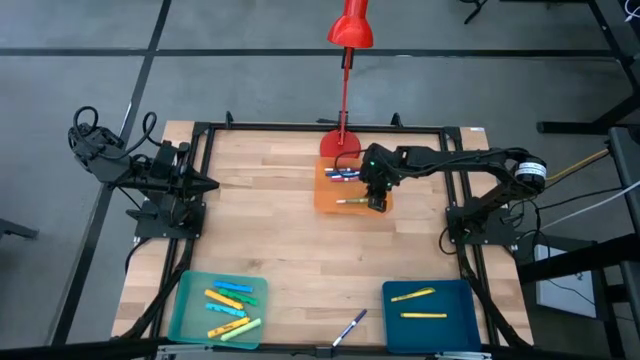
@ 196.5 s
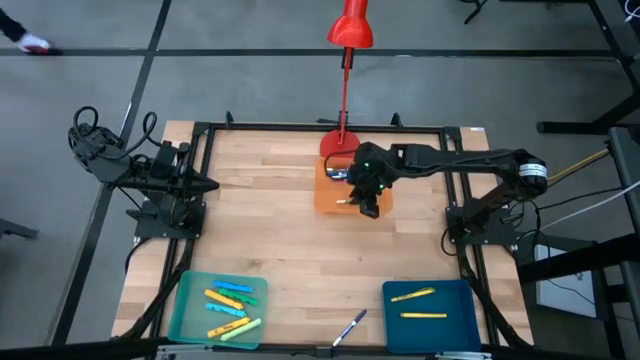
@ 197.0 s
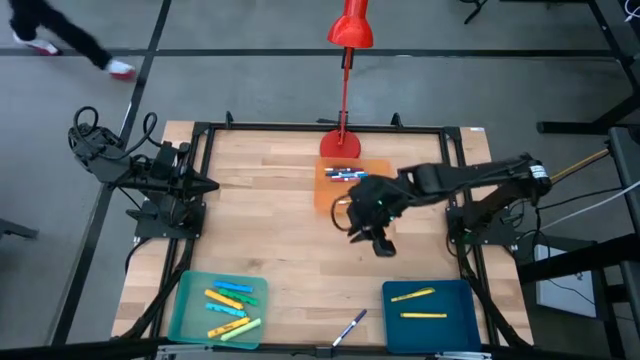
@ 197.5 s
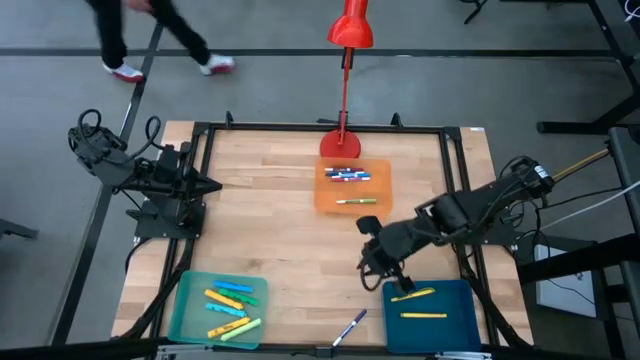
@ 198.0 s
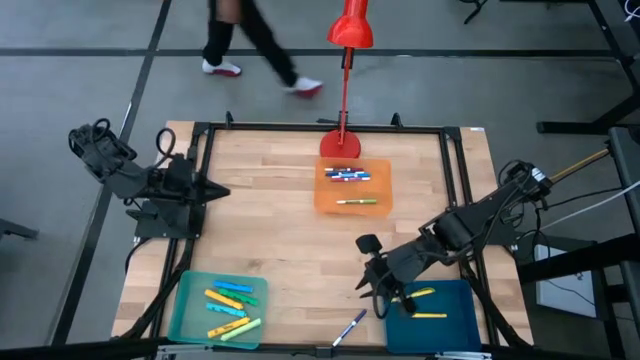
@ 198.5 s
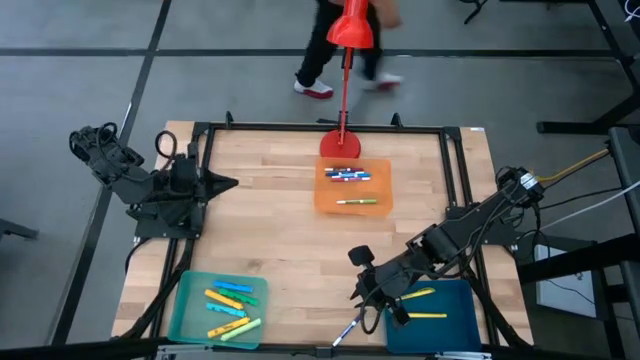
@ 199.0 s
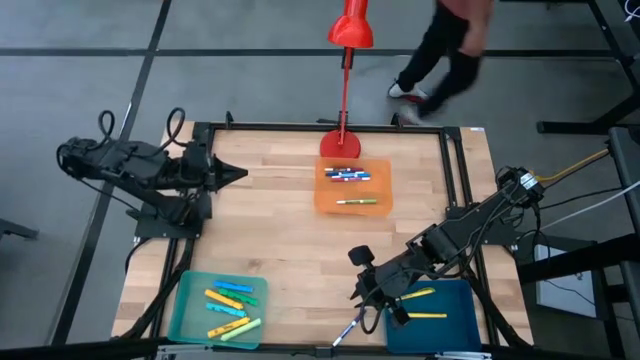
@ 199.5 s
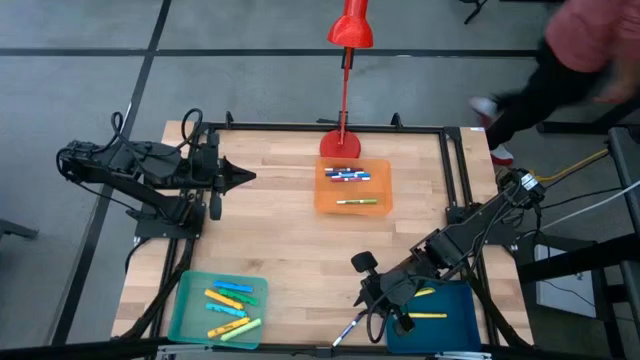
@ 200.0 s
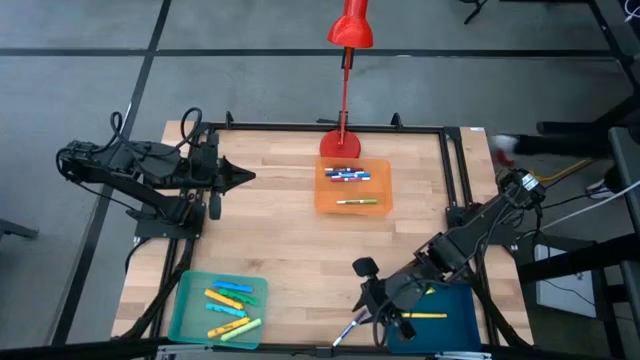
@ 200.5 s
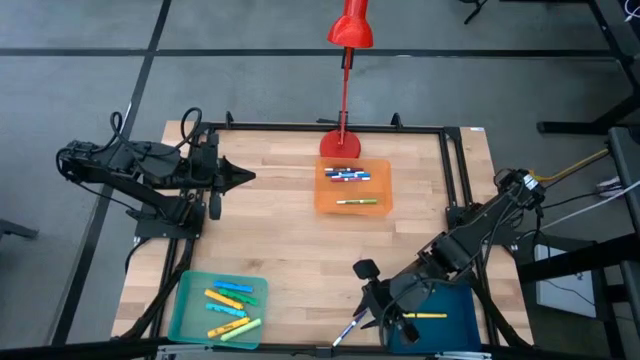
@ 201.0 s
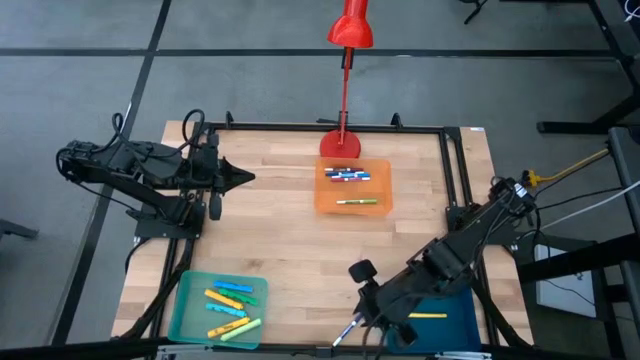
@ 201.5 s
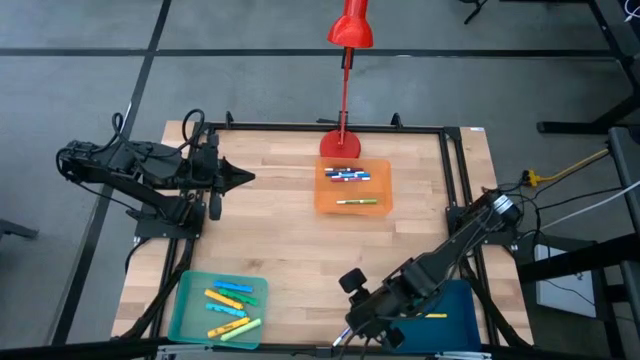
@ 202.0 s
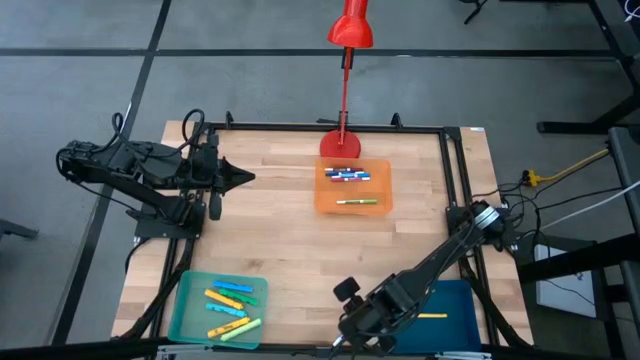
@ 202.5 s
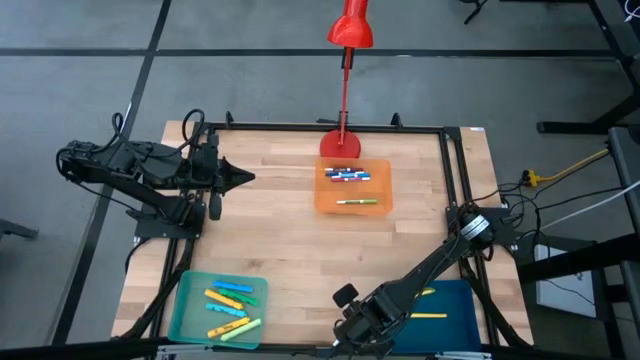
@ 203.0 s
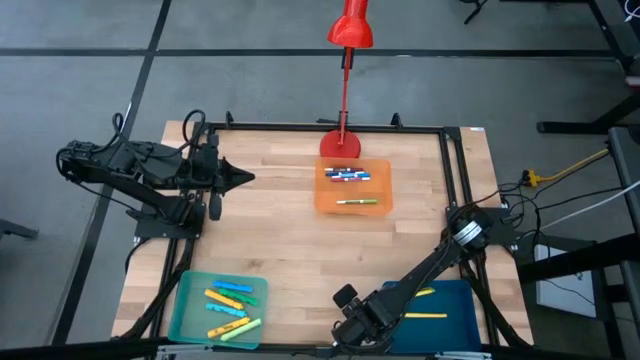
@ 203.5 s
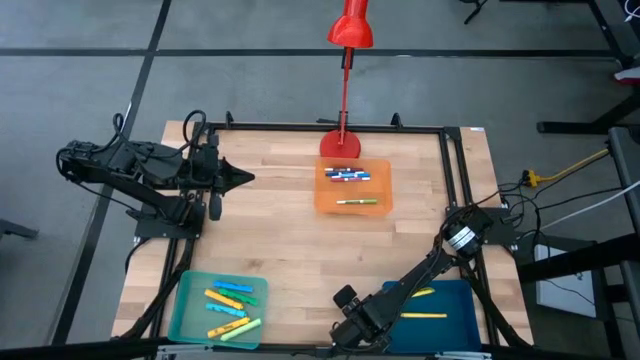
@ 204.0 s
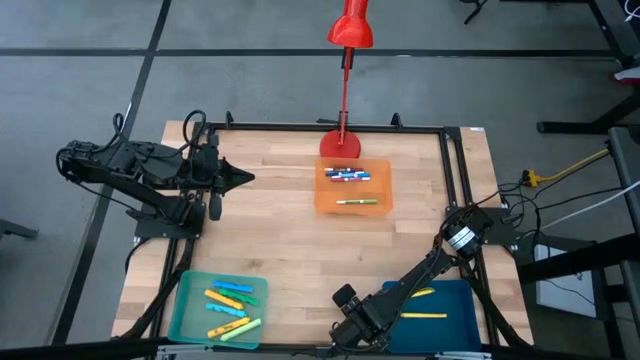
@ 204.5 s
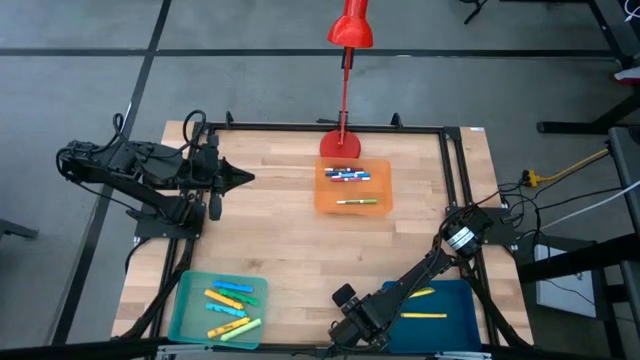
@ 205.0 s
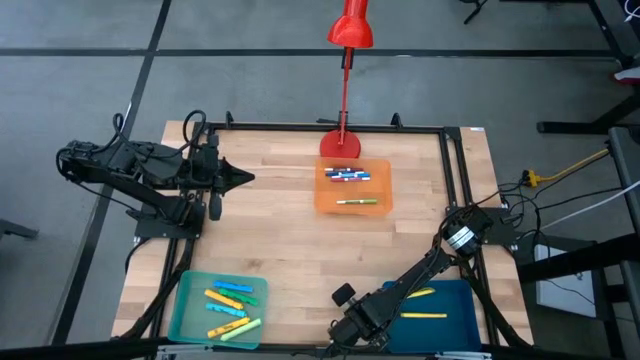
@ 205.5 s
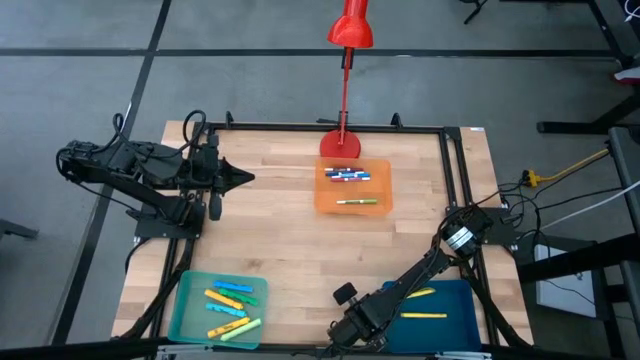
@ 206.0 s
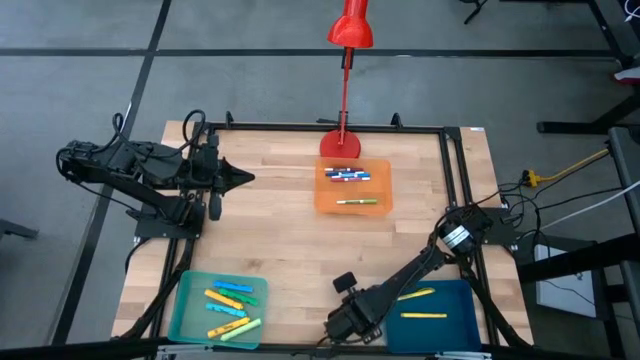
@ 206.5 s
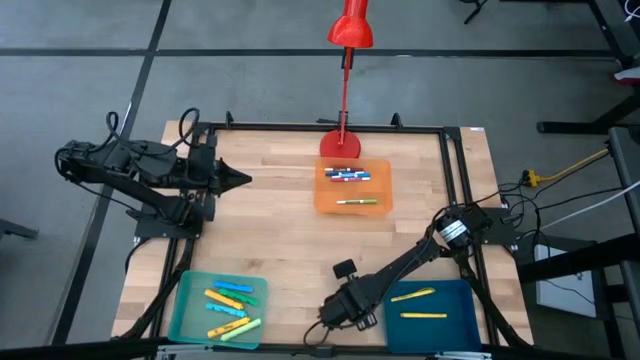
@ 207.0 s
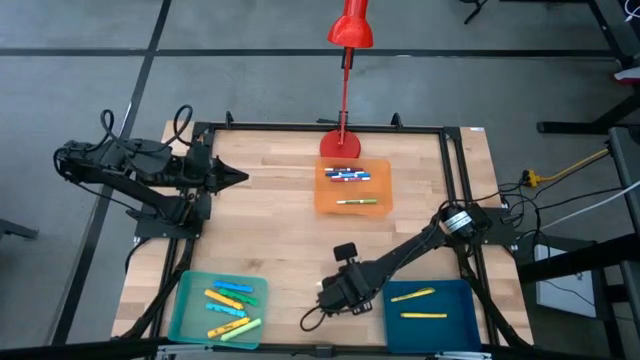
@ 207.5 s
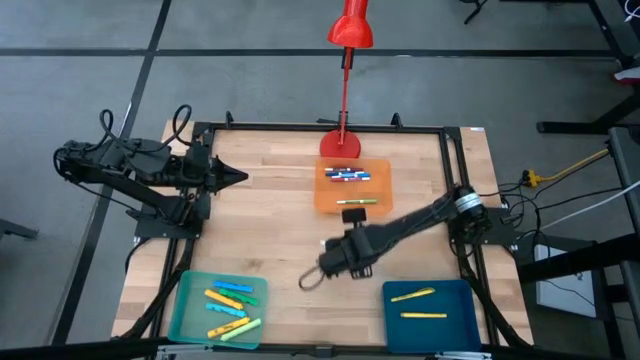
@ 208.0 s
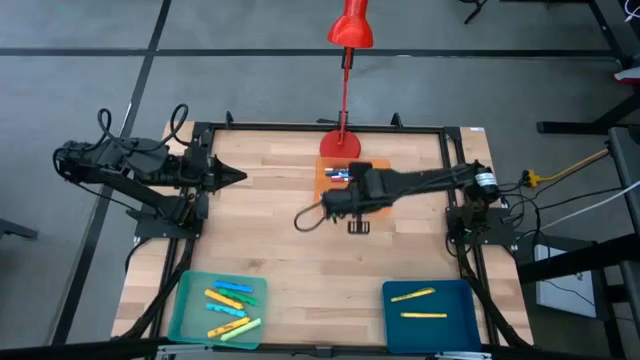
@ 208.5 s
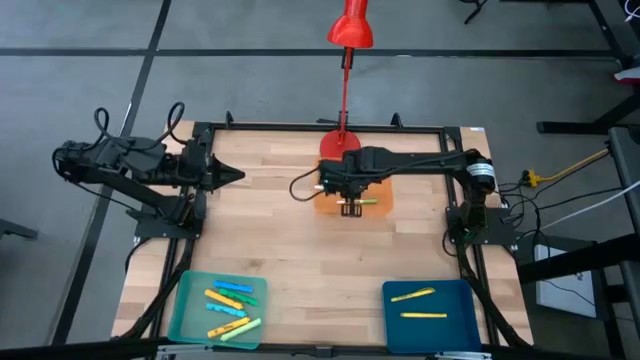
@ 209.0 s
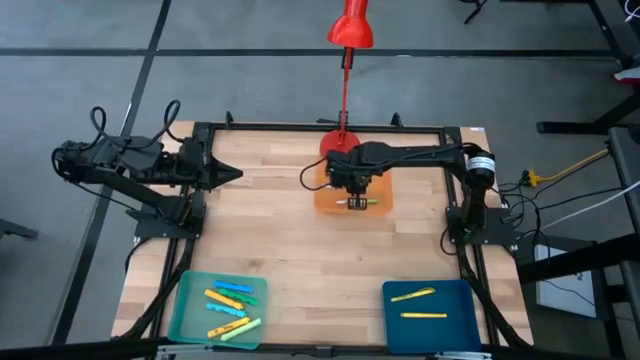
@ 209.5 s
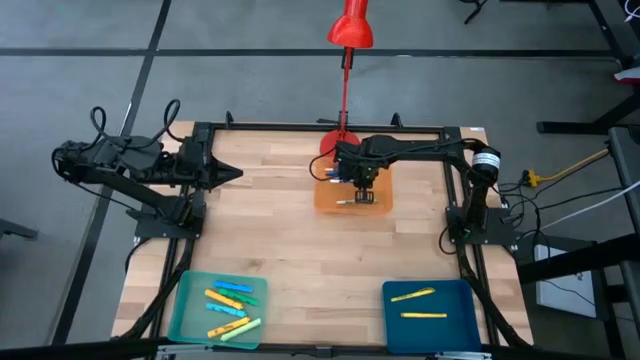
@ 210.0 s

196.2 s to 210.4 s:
Task: Pick & Place Markers
Put the blue marker pen into the orange bin

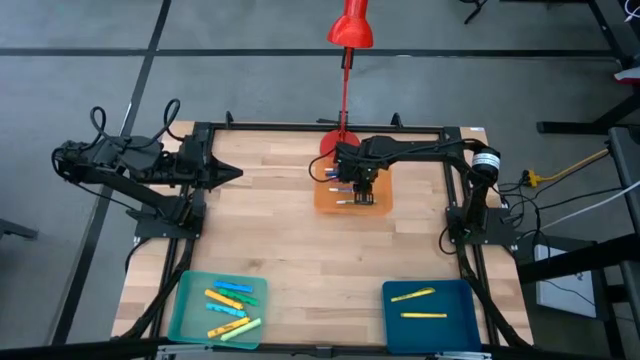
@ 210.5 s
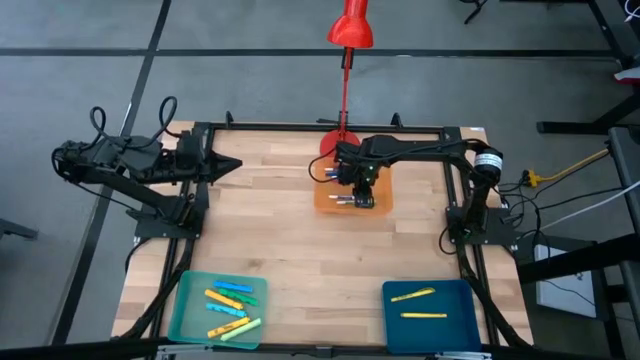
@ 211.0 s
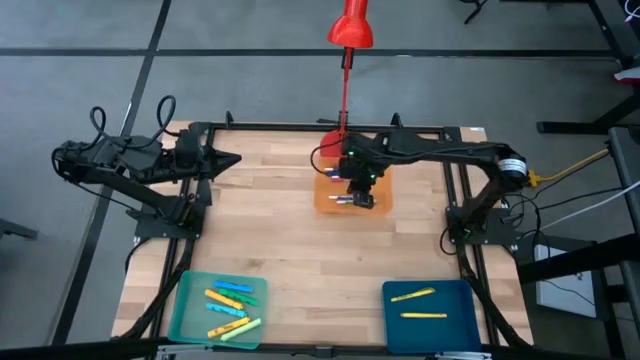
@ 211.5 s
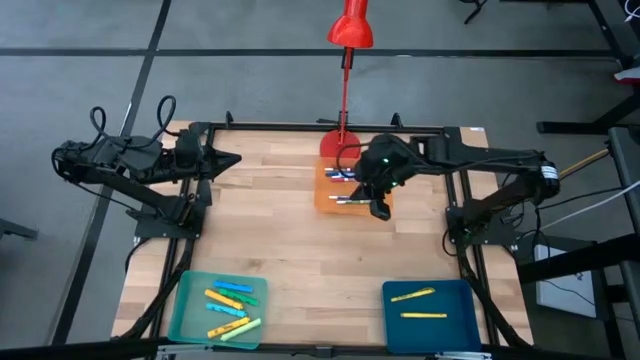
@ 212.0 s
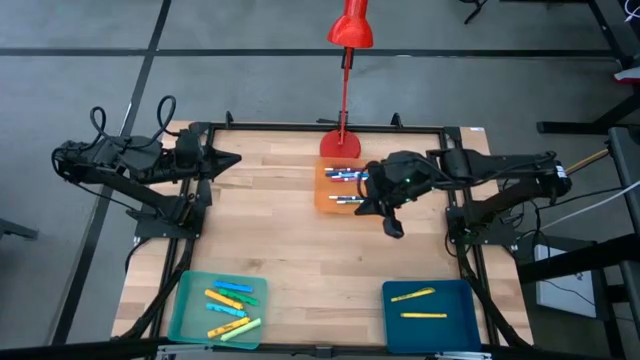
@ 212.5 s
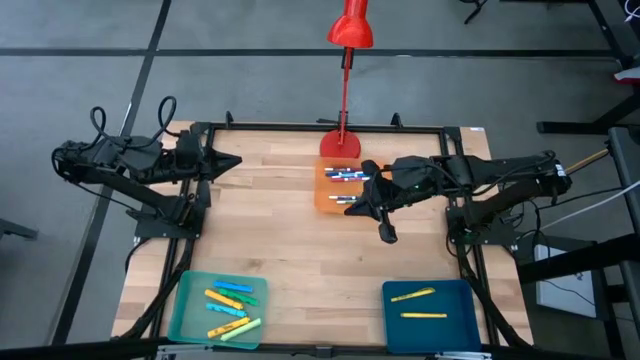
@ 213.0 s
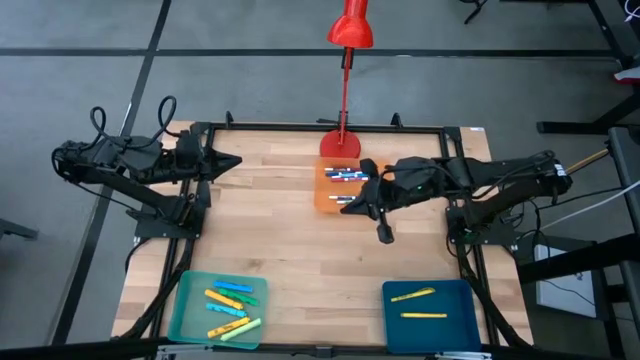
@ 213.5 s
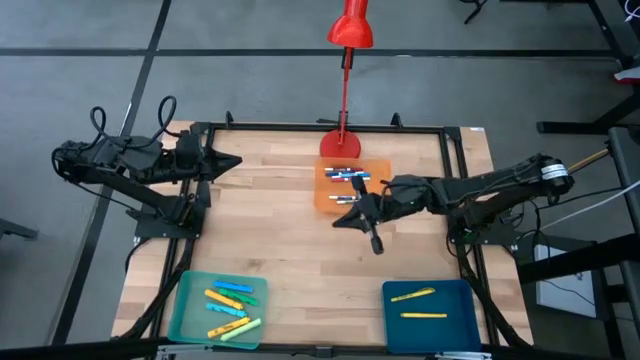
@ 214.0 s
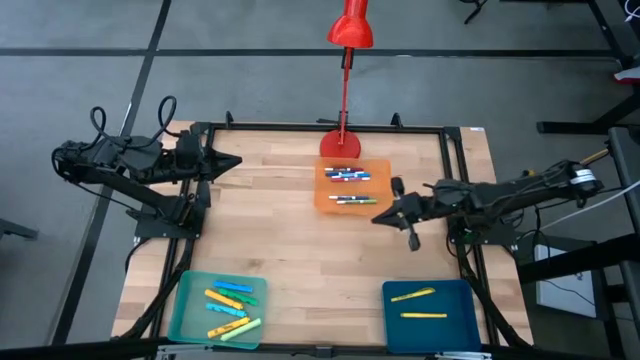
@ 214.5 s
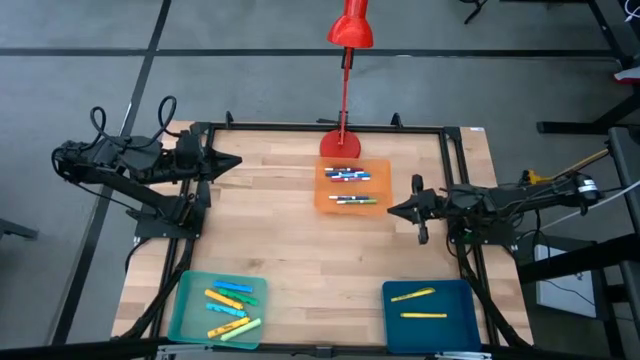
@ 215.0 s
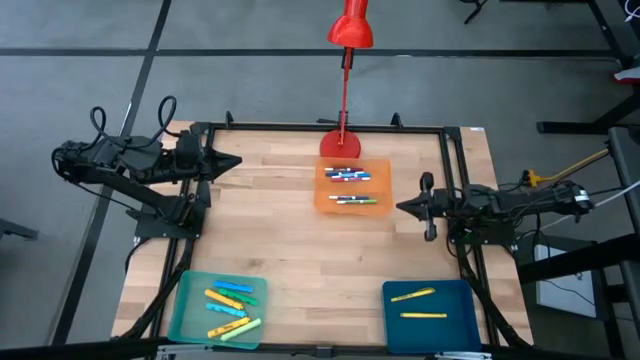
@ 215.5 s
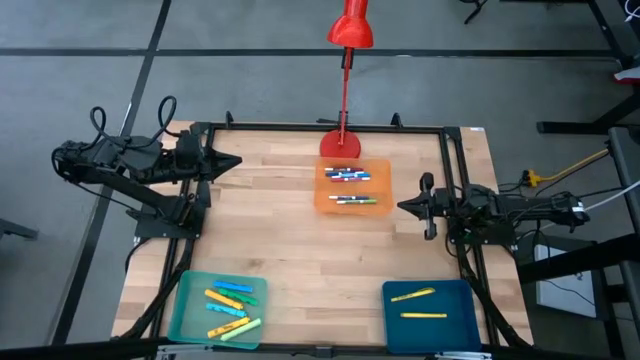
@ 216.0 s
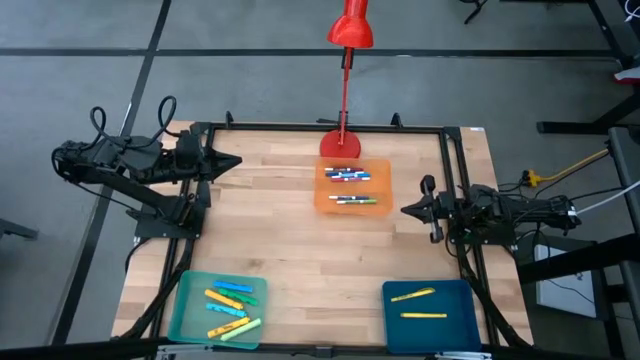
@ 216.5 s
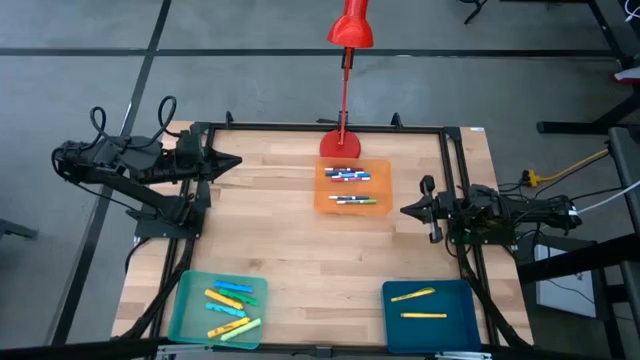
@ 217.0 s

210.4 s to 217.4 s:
Return to Home Position
